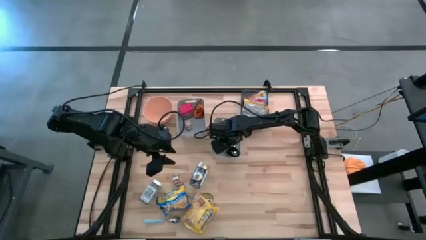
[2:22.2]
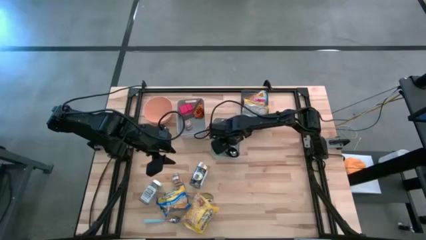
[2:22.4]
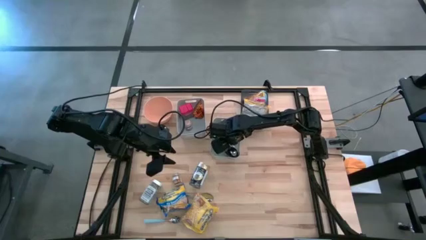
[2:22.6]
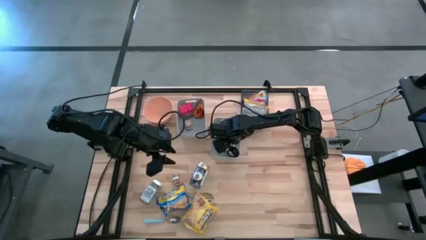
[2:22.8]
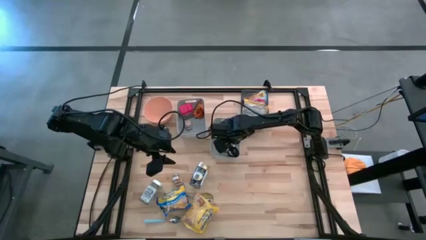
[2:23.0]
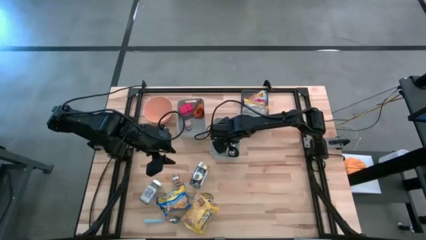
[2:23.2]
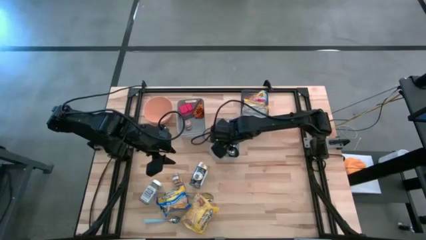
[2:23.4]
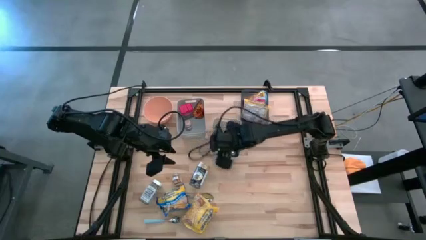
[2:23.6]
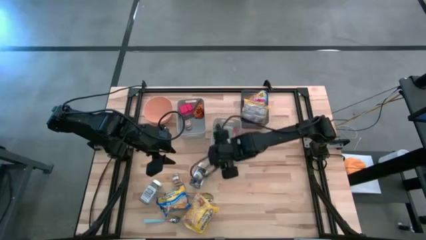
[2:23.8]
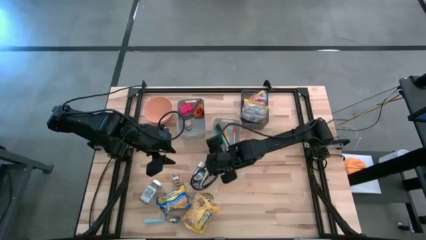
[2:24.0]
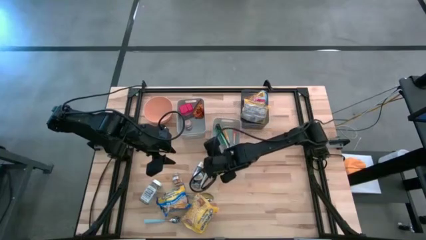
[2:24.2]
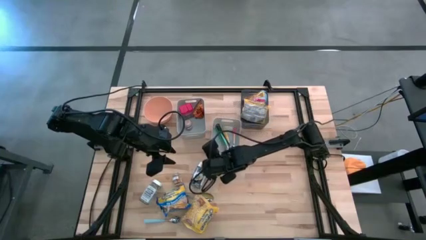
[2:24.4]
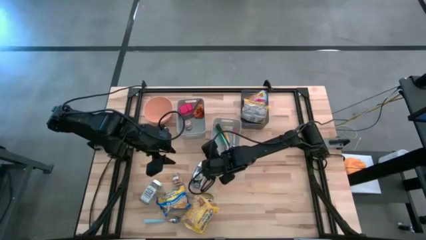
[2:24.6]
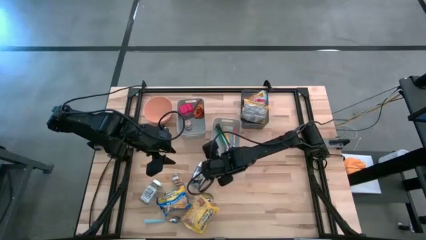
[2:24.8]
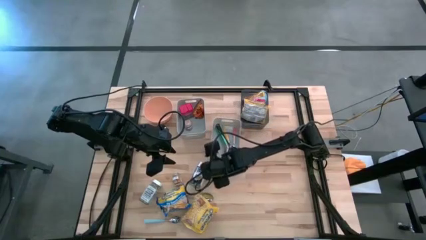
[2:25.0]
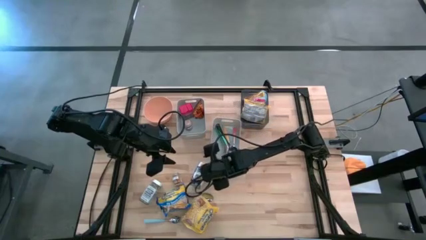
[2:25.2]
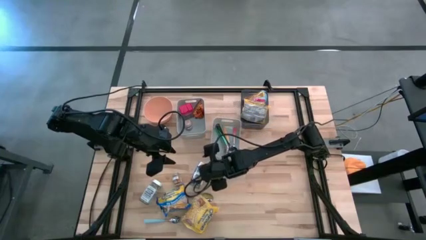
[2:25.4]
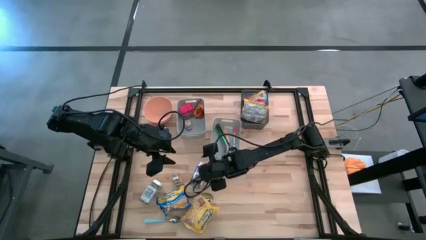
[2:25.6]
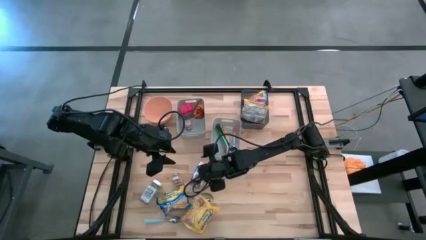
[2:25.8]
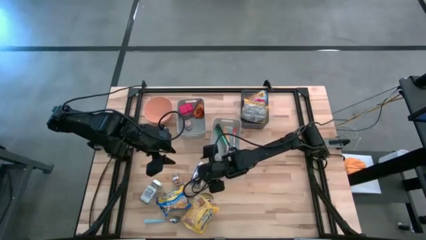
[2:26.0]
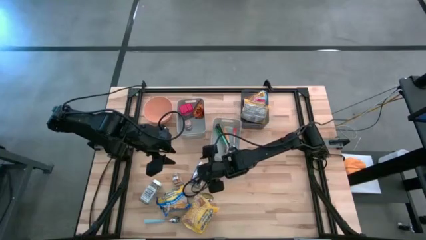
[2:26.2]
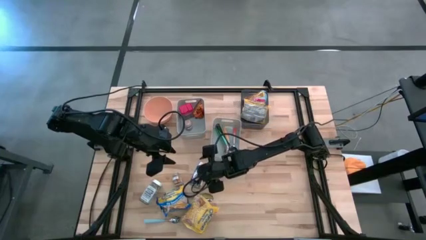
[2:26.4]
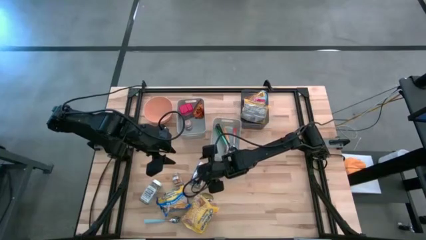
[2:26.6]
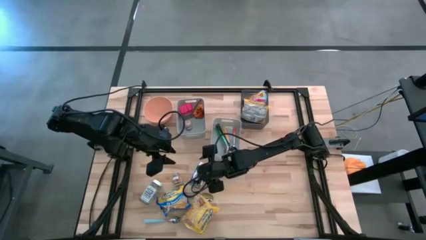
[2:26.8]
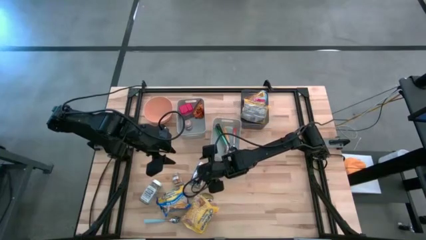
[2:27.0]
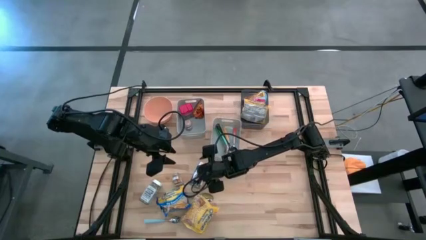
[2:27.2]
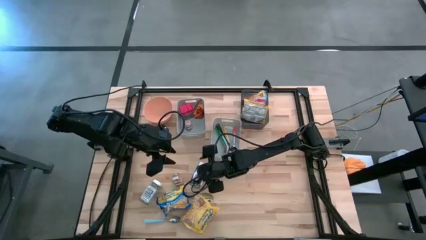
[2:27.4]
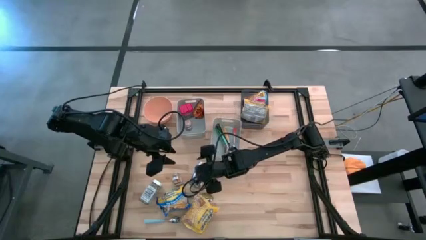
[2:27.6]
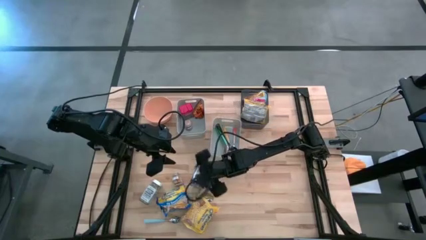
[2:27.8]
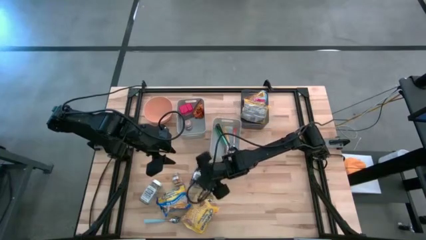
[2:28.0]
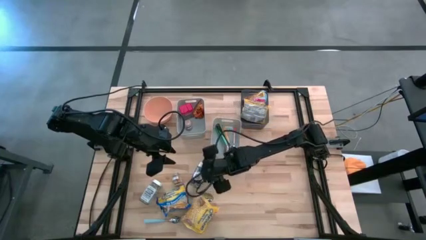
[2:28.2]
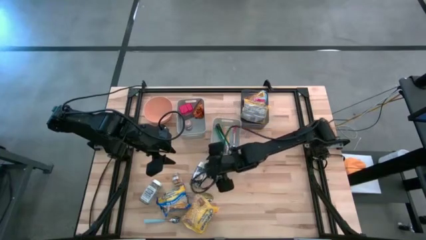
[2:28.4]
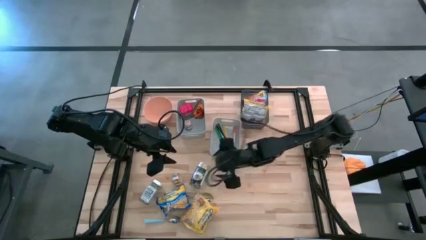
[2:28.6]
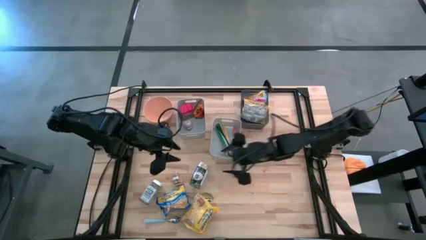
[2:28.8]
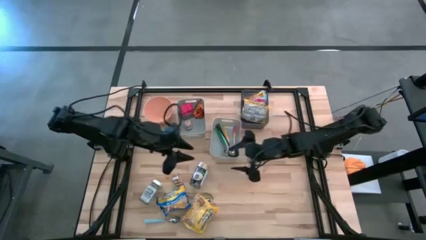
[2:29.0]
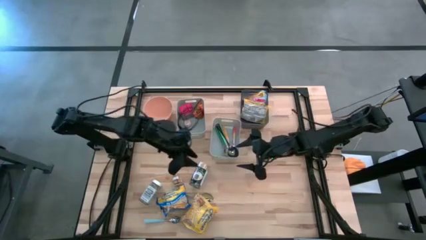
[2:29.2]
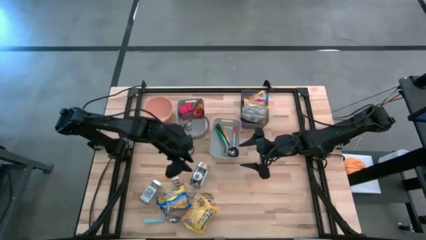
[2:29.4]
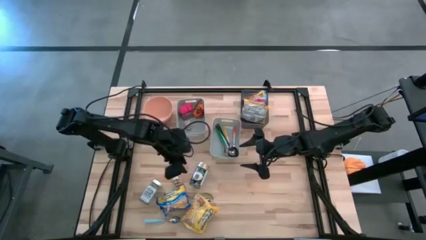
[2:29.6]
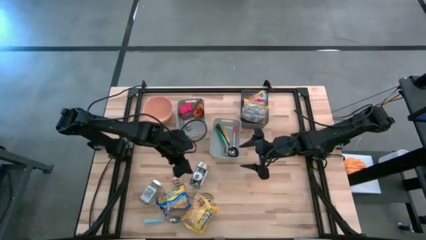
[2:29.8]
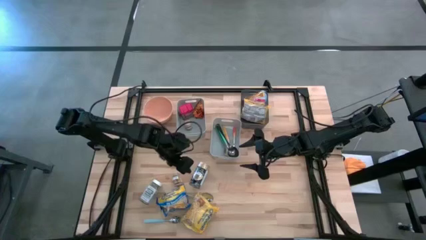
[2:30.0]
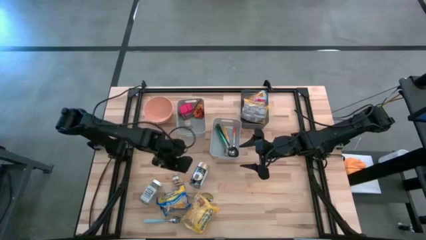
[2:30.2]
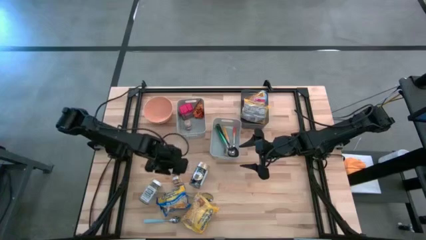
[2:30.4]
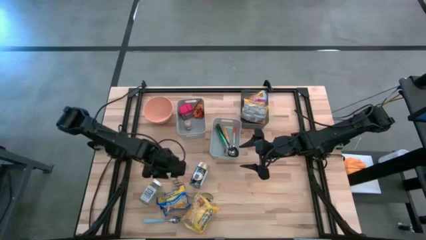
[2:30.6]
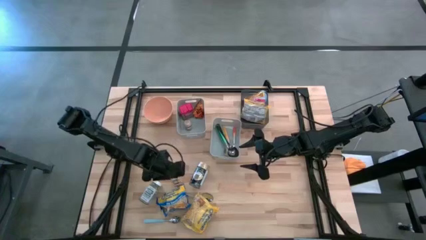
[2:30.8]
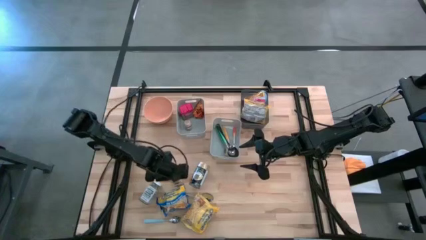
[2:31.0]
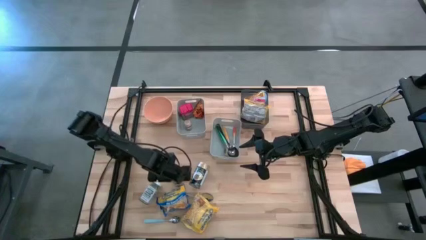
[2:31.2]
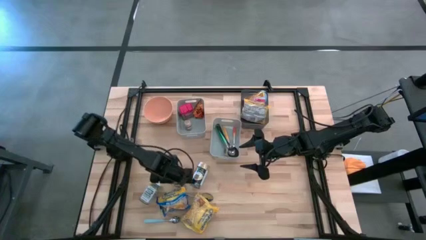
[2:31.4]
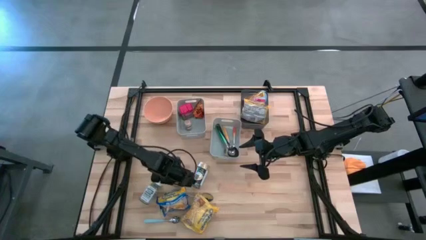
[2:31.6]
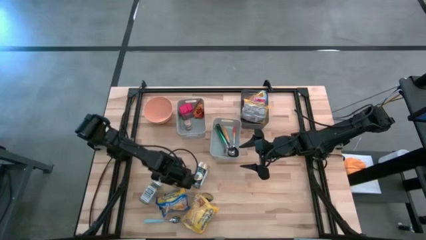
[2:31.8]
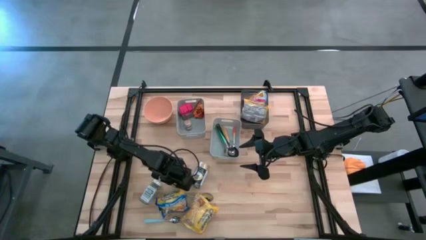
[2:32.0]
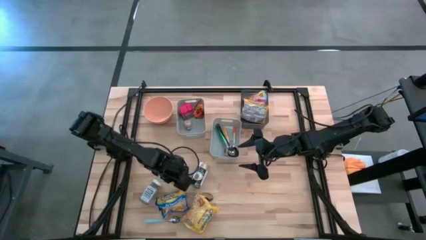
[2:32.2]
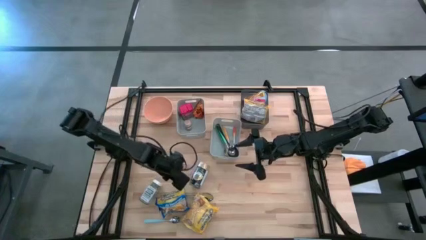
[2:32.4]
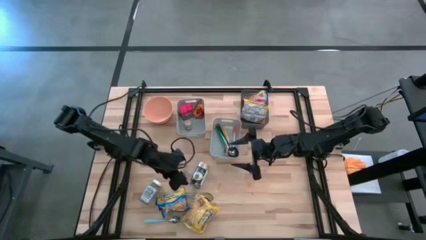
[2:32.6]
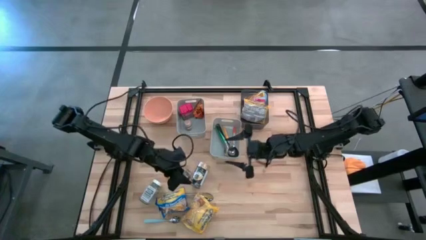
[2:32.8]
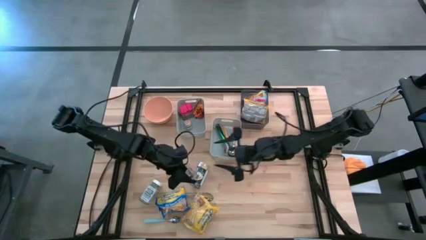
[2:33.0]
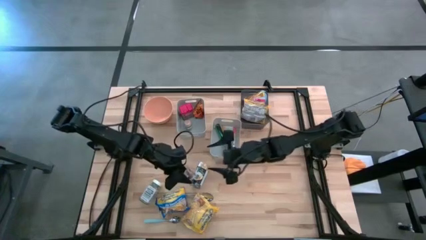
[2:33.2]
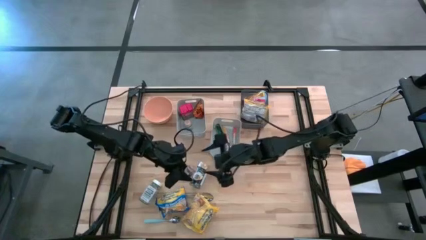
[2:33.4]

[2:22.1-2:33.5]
Put the brown seasoning bottle into the left gray bin
